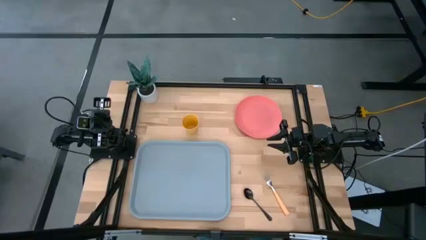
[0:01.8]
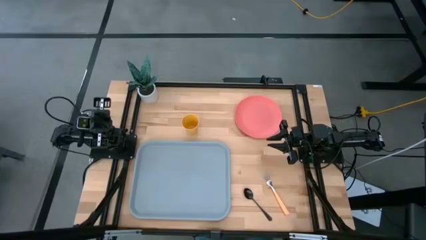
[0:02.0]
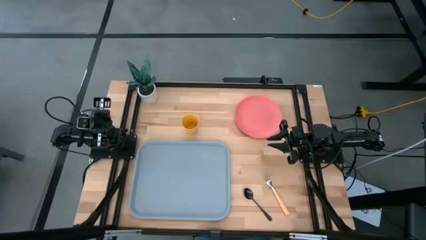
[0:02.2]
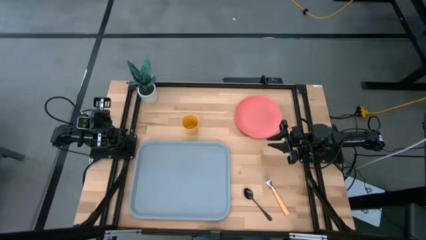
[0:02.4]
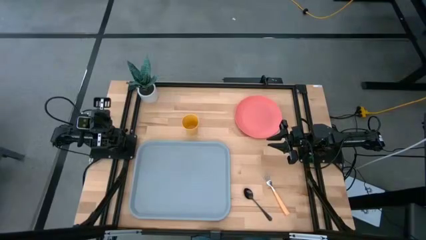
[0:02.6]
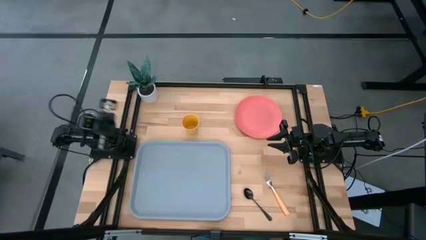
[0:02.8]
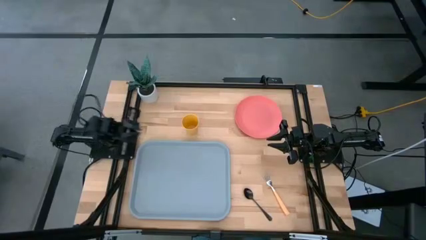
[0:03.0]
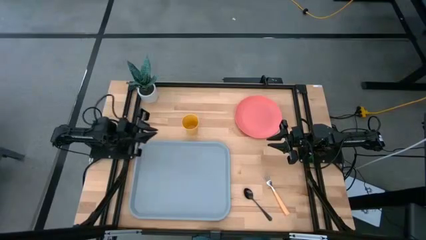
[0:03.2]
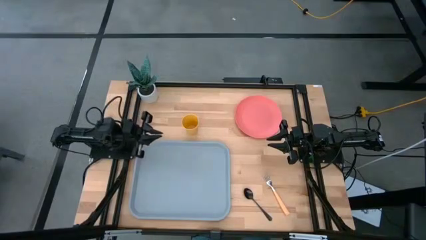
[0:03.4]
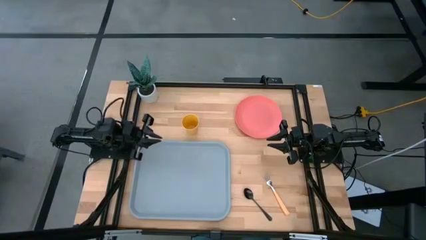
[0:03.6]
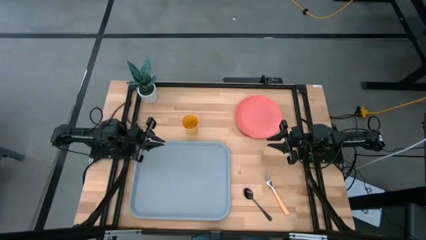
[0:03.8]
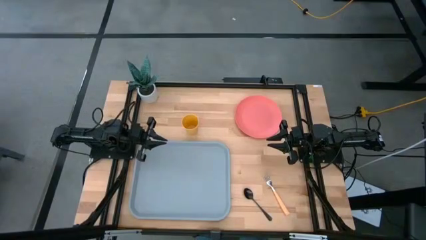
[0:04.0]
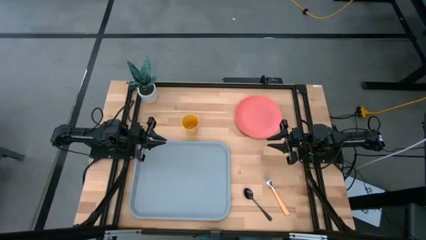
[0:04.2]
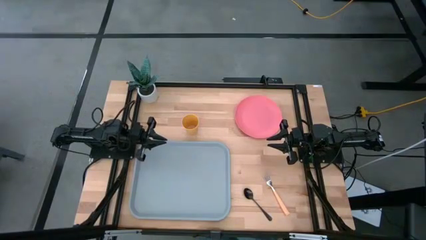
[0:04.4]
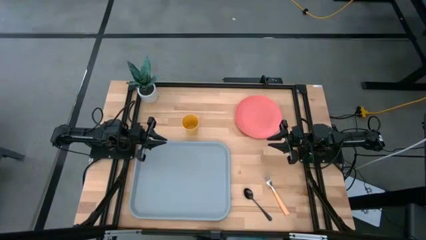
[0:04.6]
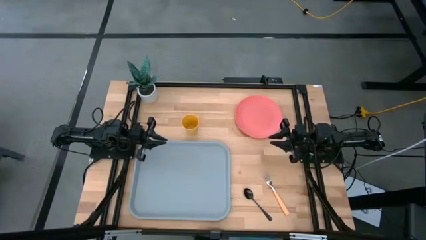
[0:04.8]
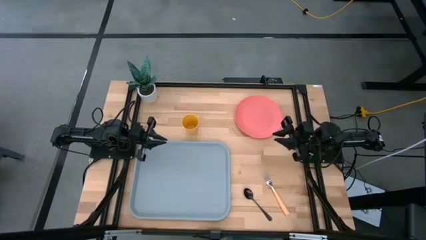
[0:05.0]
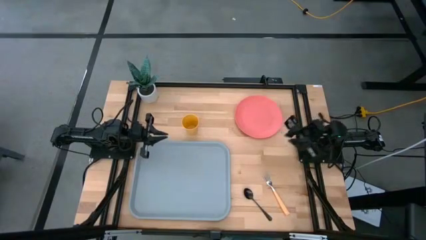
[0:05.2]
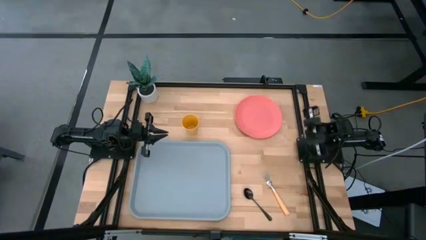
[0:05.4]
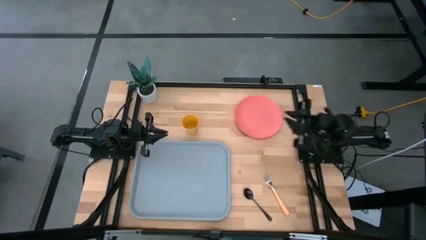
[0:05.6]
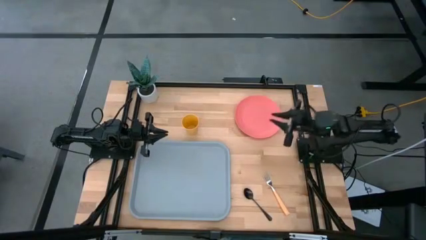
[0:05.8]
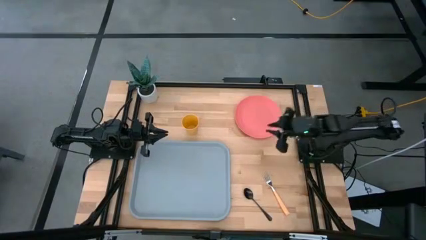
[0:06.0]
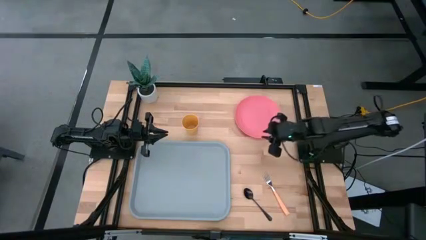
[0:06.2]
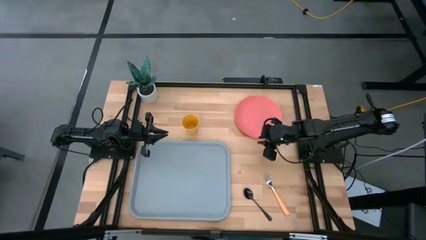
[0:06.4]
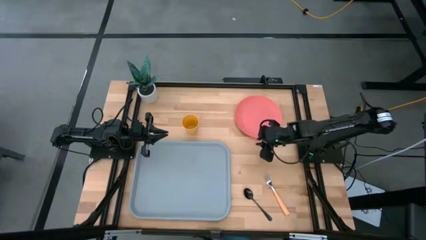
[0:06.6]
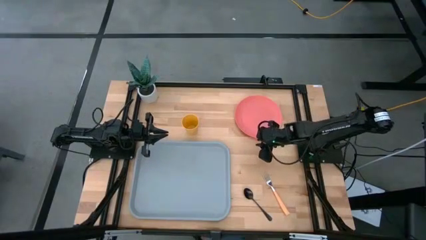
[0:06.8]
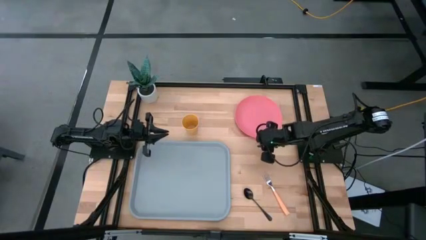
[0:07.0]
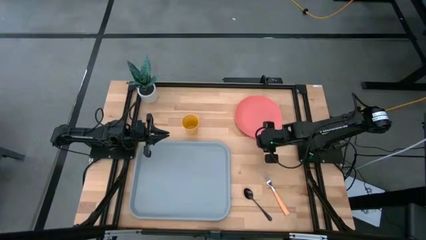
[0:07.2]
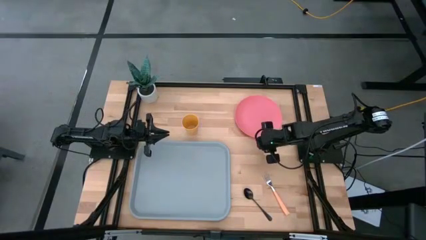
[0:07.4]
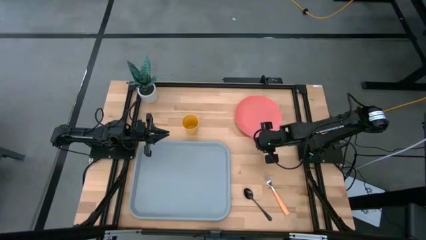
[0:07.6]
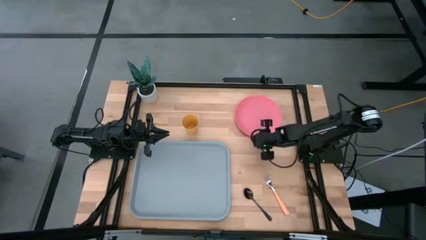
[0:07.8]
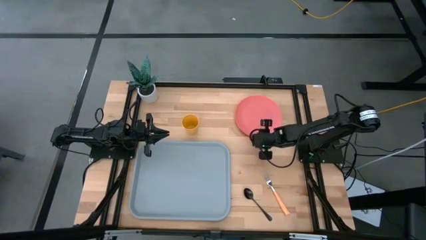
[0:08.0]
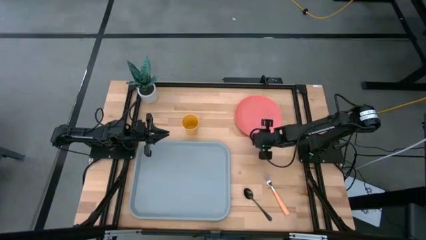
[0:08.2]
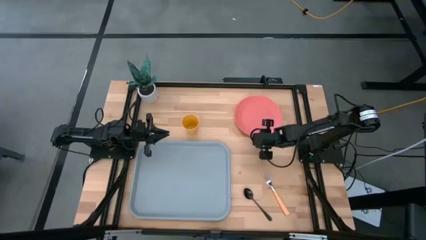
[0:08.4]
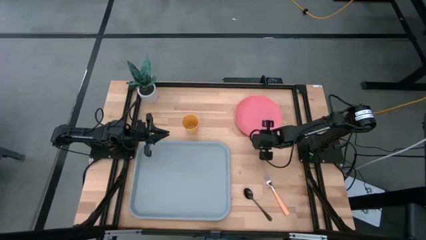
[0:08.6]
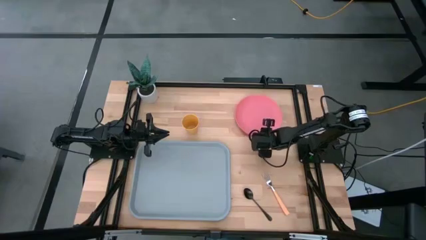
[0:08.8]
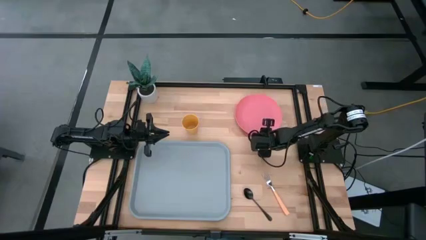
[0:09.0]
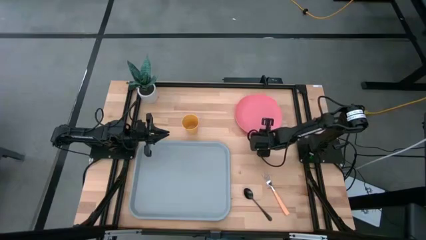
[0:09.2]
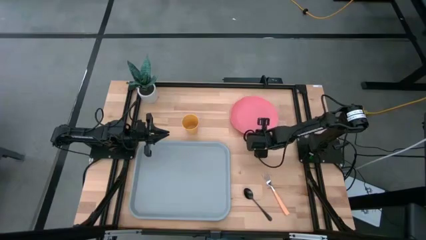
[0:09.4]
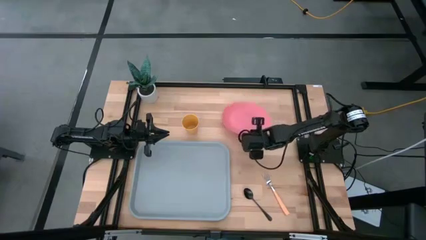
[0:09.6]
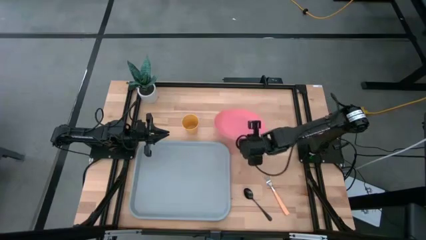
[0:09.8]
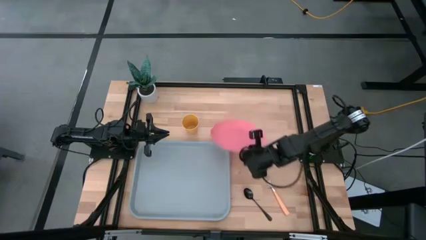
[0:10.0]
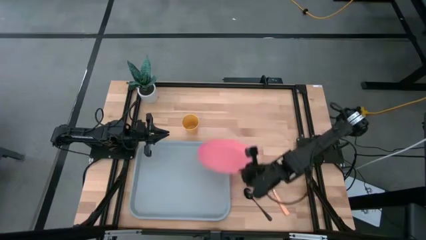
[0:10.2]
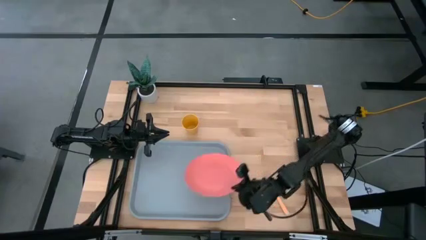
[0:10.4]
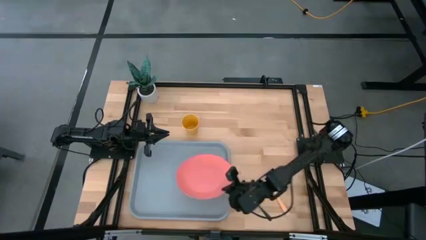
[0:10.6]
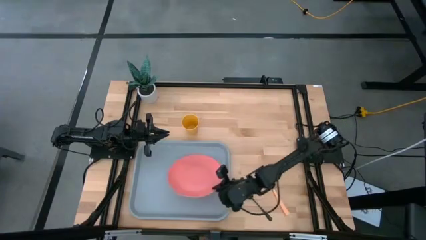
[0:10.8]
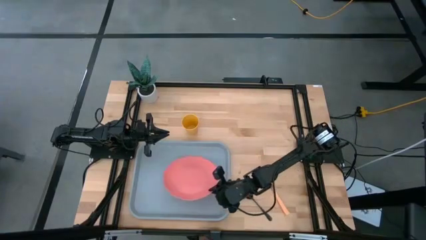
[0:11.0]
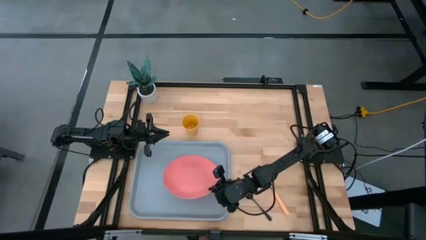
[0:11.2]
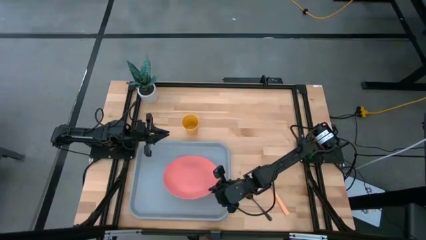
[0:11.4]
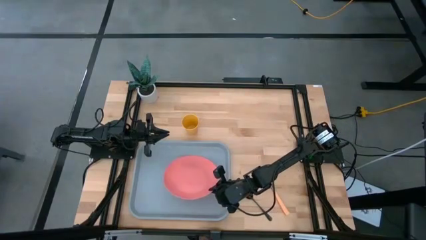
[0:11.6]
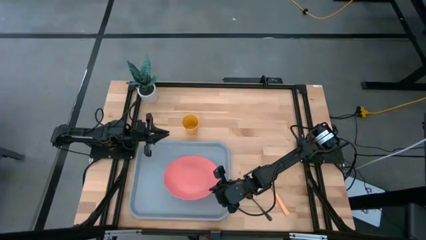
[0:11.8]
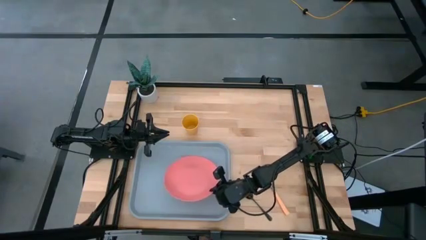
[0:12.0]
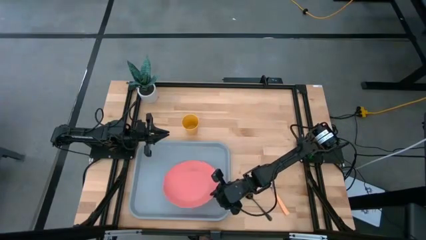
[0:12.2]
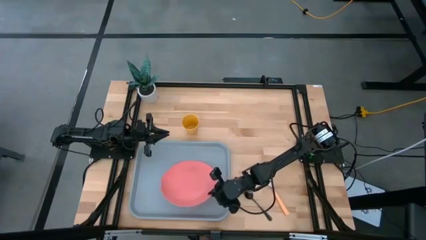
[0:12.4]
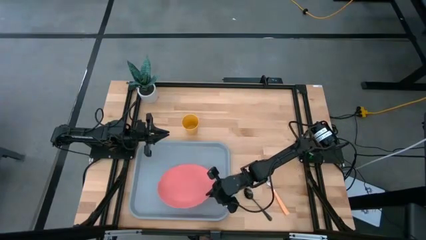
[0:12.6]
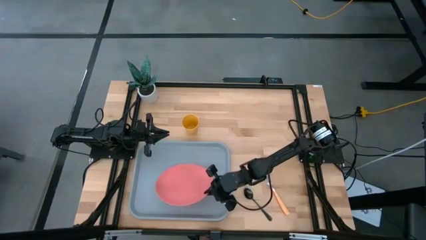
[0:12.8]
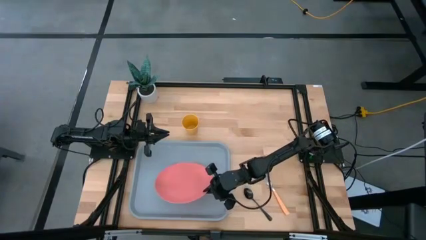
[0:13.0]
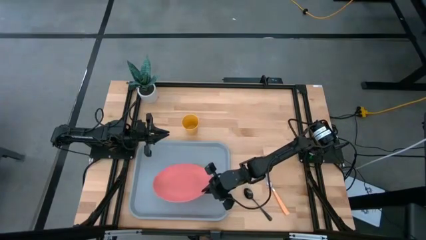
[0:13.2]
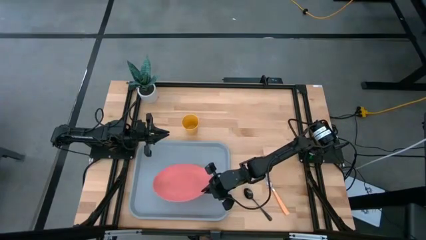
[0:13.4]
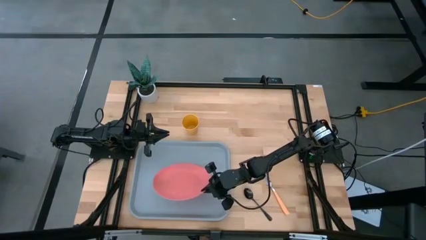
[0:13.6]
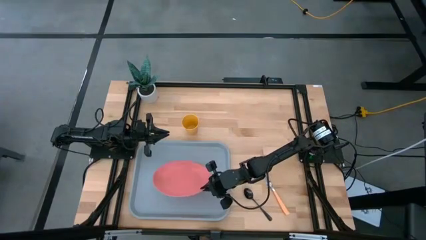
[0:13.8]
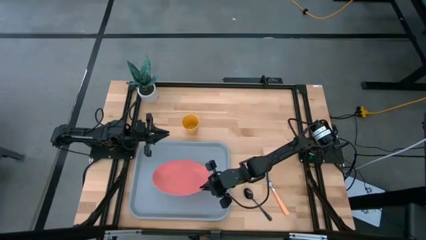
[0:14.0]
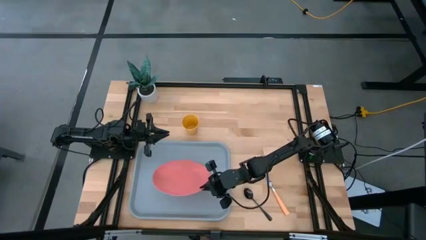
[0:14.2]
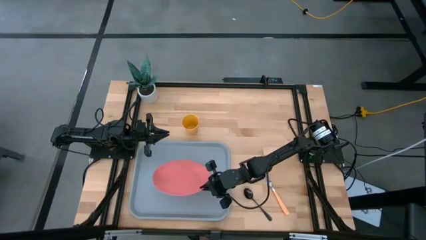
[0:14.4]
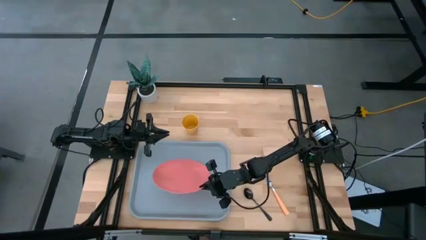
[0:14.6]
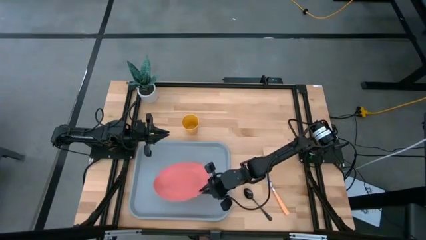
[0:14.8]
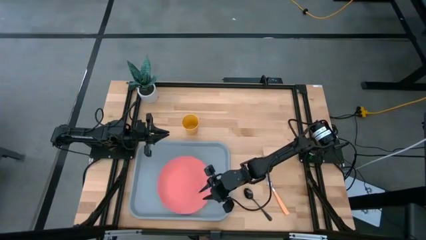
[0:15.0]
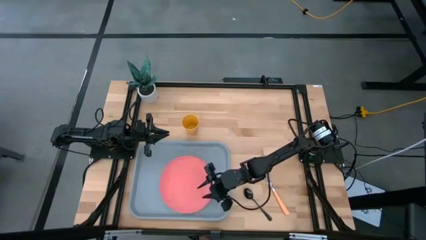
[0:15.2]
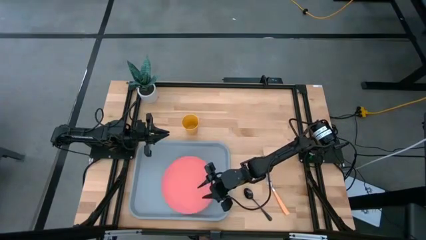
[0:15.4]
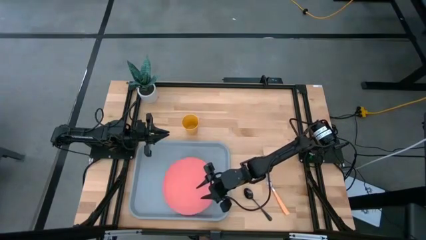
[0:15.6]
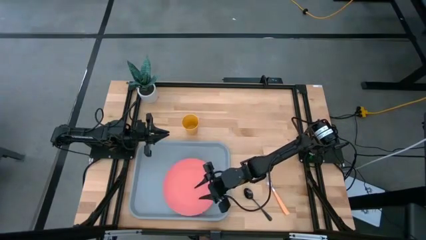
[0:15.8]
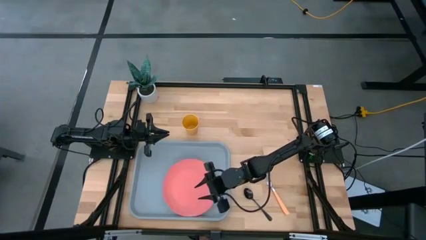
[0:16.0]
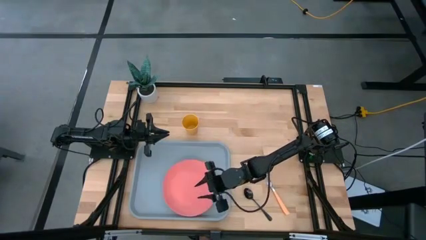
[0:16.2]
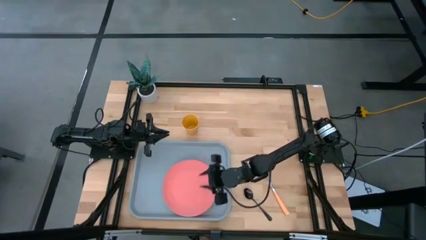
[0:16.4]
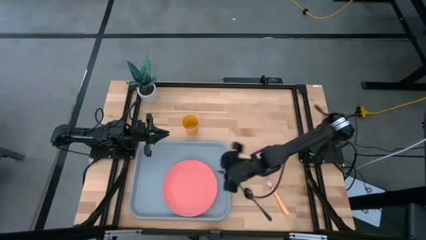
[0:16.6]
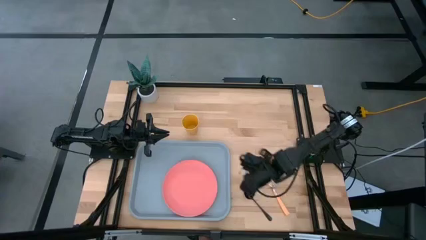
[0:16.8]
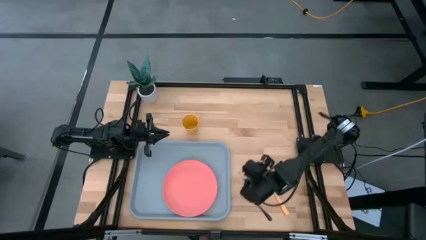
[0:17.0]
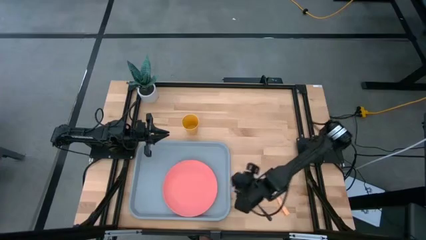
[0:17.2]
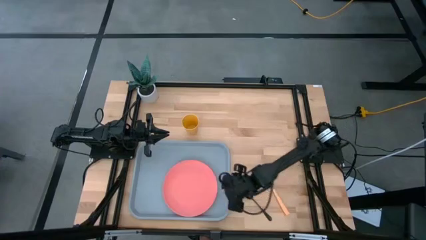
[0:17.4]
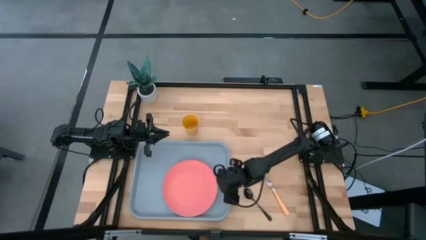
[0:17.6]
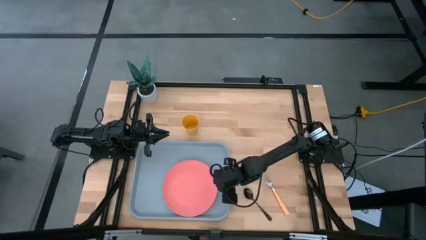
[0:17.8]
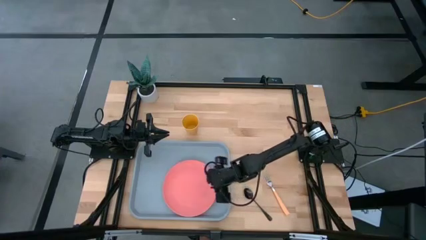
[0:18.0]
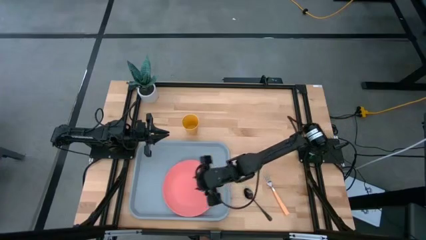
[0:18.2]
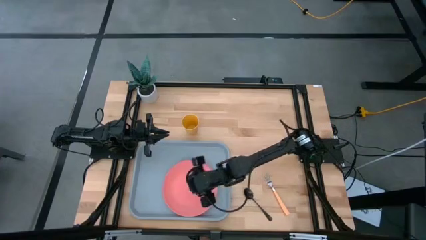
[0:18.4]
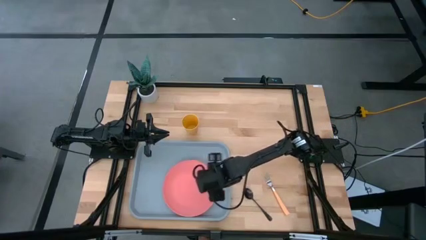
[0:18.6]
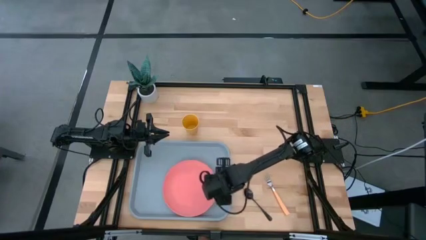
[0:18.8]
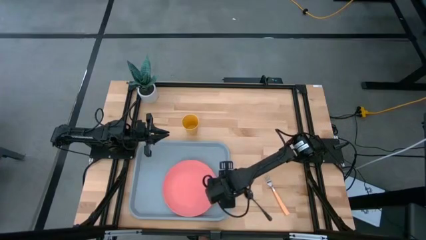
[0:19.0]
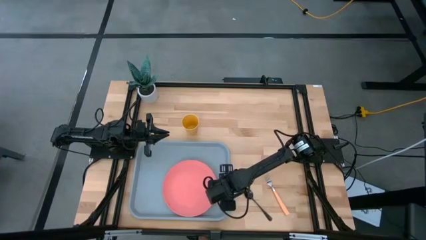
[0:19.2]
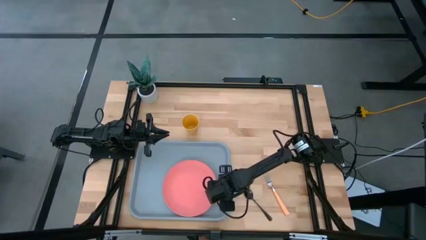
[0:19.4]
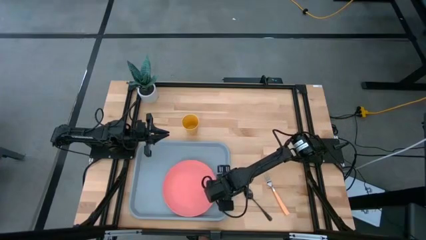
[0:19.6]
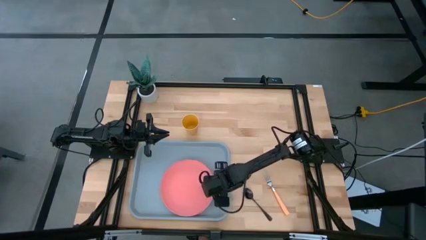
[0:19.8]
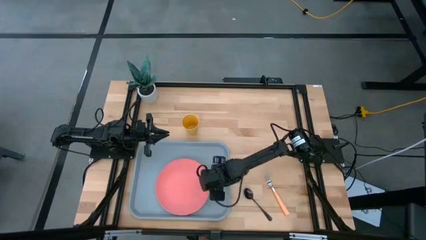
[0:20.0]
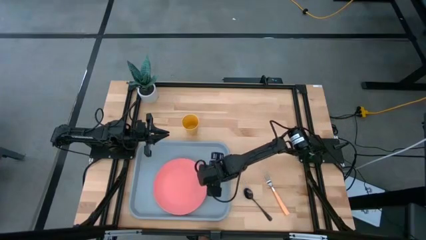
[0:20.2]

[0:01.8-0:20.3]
Task: Pick and place plate/cup/fork/spoon on tray
Put the pink plate on the grey tray
